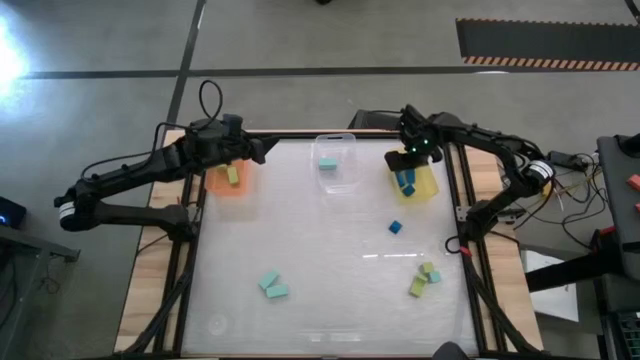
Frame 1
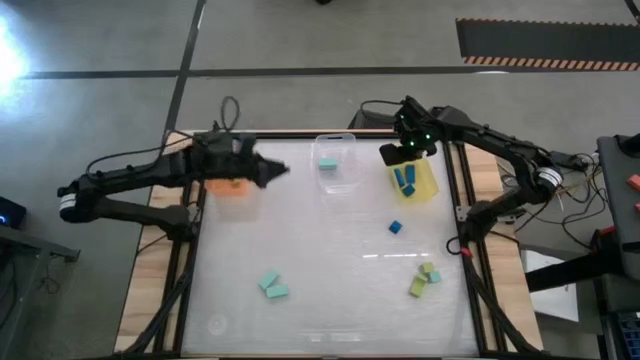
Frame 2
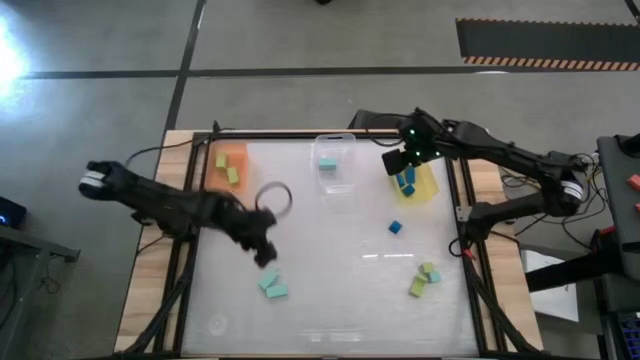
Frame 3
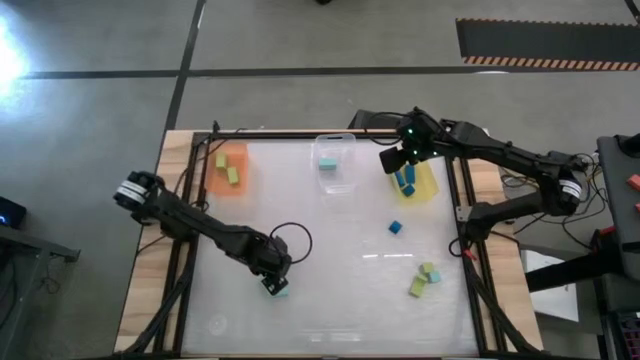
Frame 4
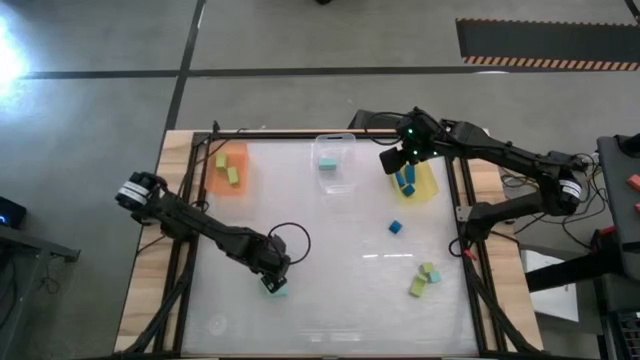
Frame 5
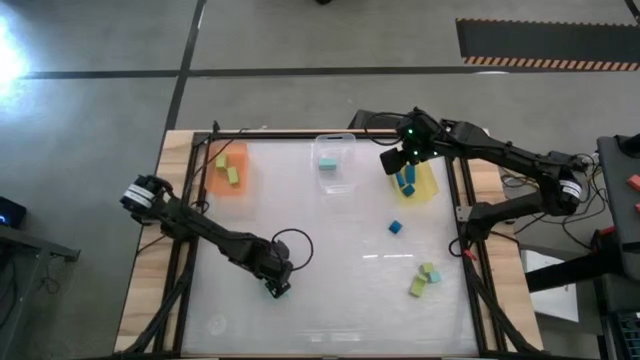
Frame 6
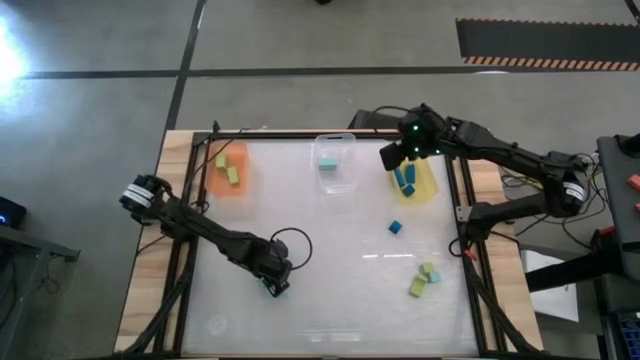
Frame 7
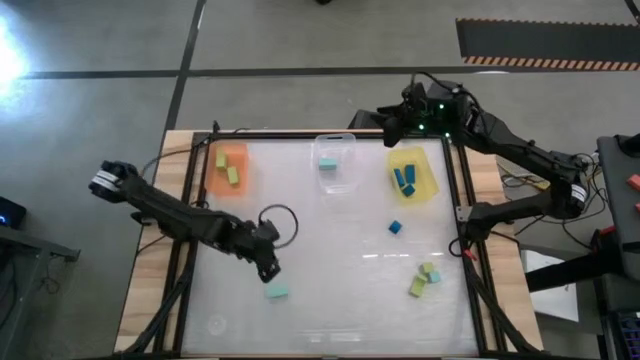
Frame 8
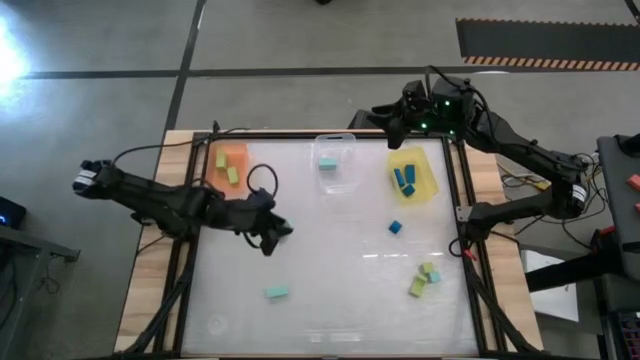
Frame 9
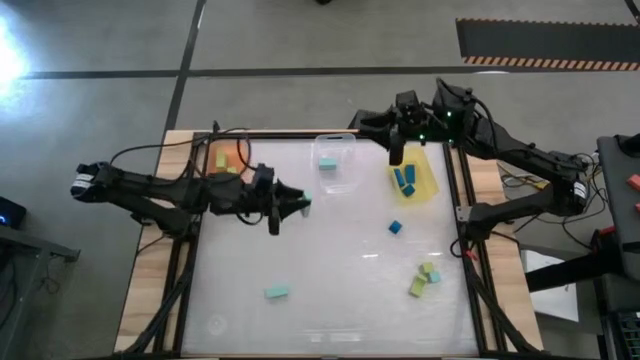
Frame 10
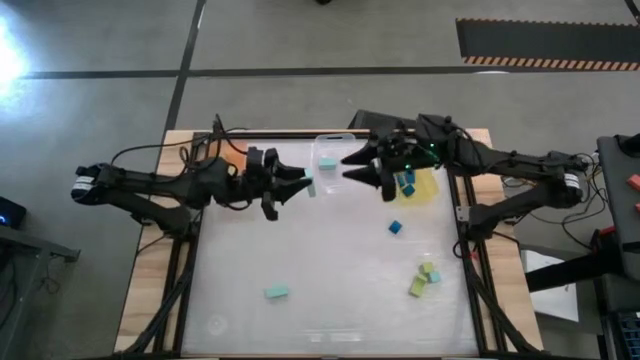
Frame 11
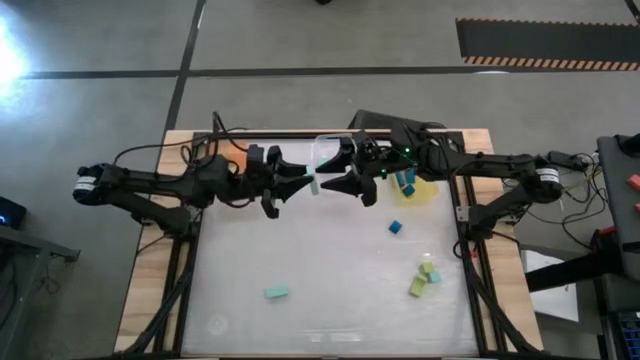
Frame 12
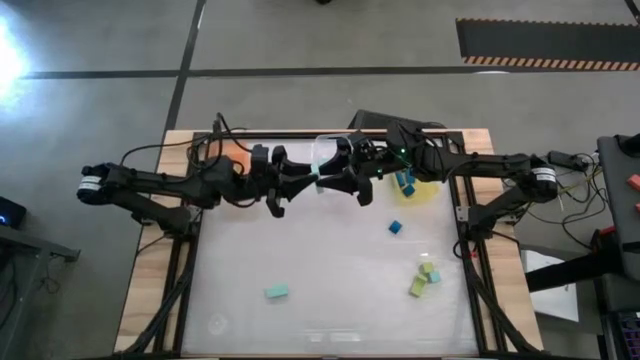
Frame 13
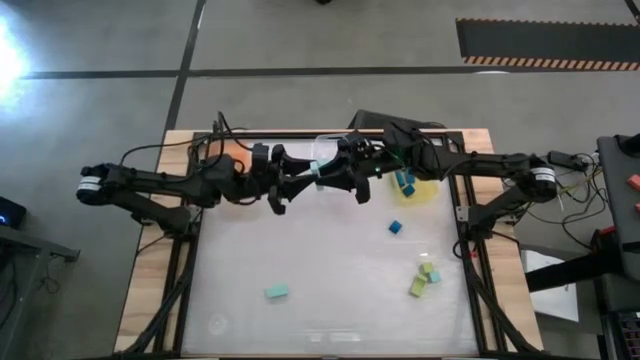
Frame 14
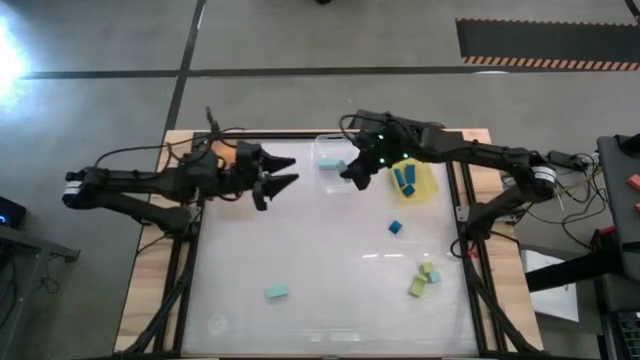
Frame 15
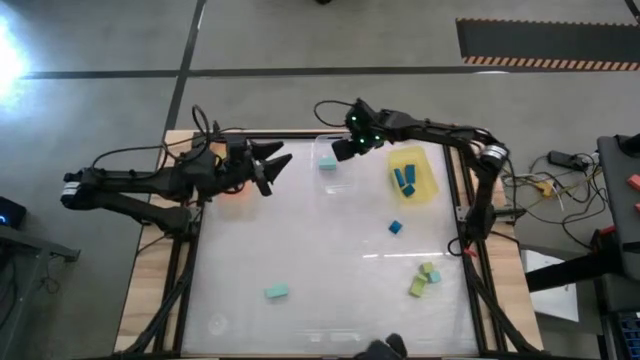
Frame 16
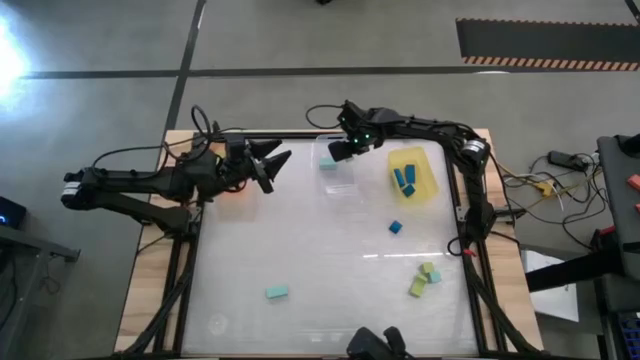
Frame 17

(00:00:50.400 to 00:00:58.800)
Task: Sort & place blocks by color
Put the light blue block into the transparent bin

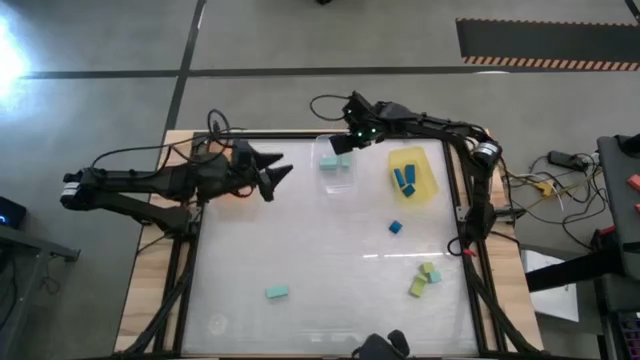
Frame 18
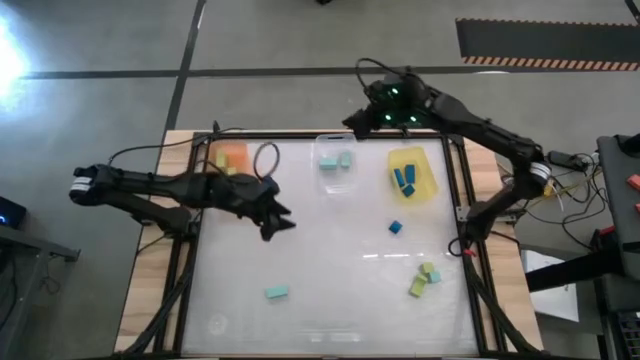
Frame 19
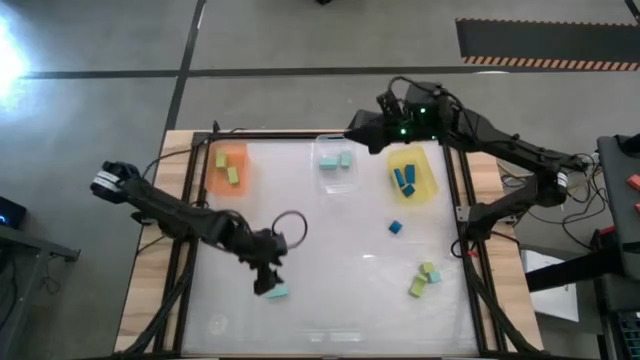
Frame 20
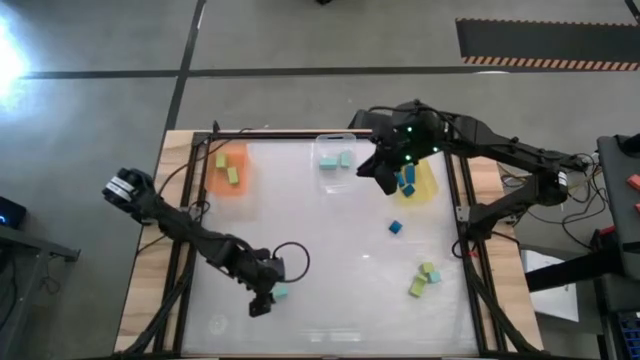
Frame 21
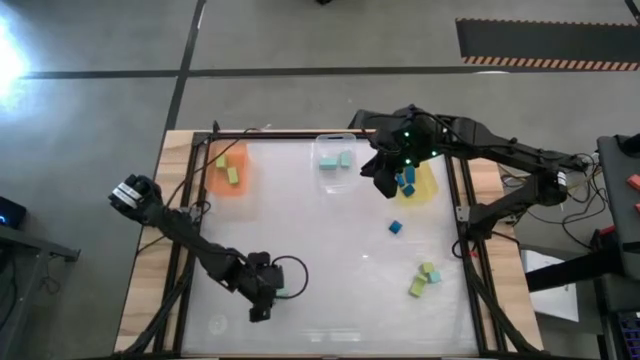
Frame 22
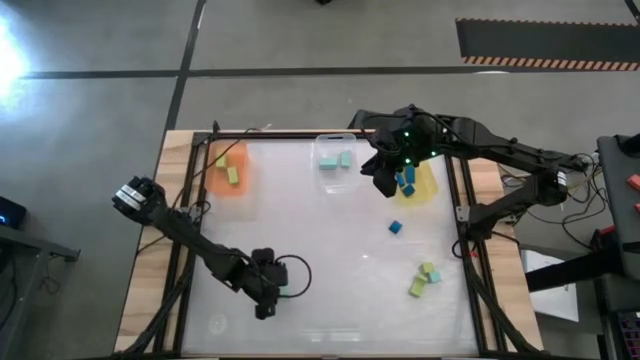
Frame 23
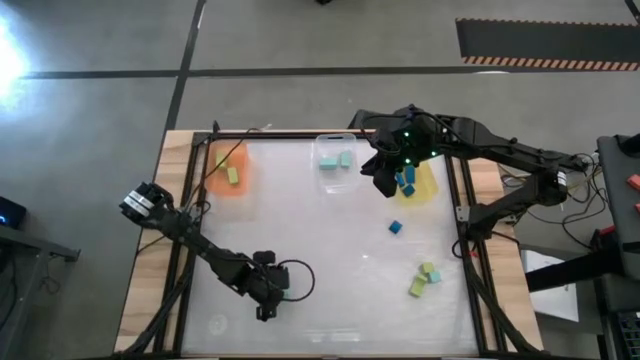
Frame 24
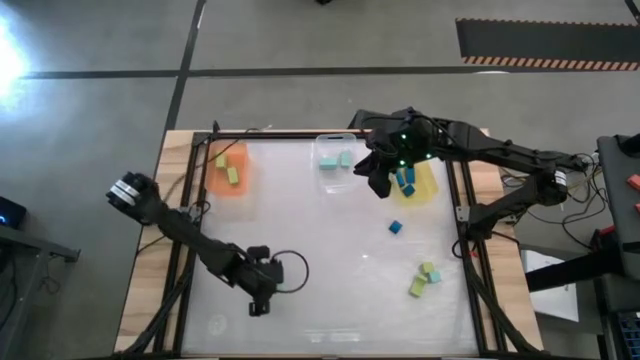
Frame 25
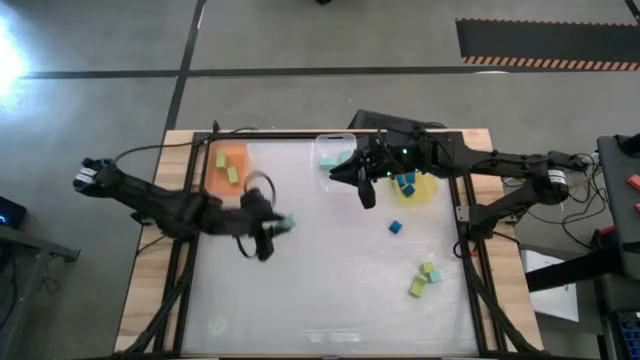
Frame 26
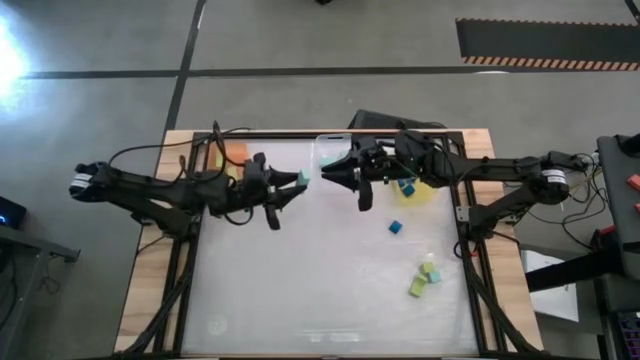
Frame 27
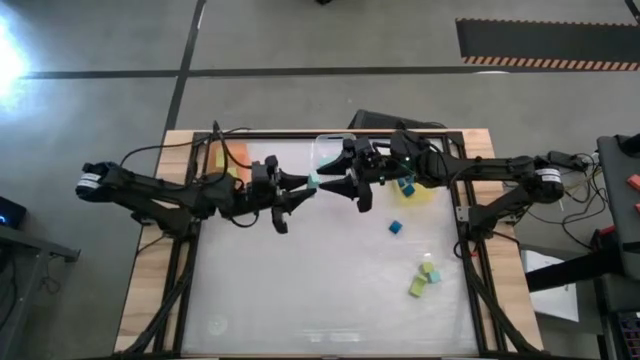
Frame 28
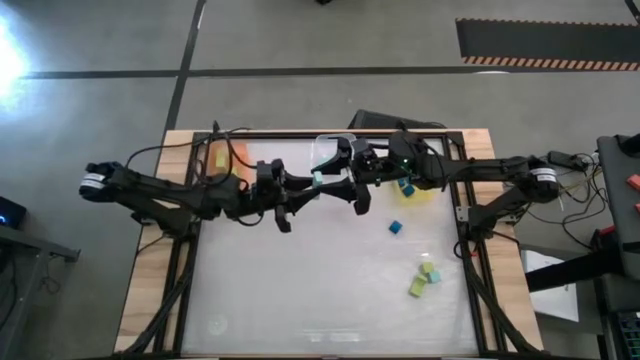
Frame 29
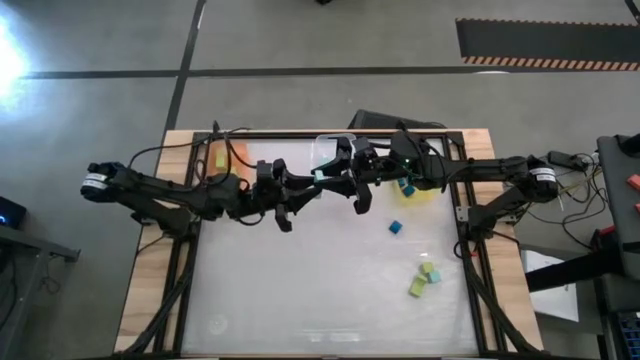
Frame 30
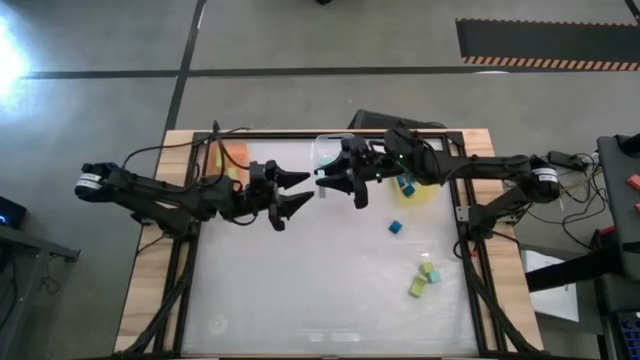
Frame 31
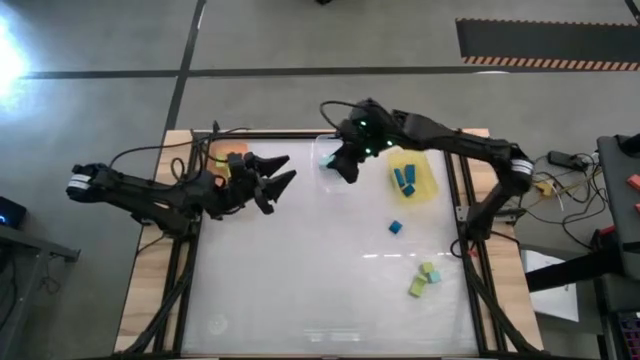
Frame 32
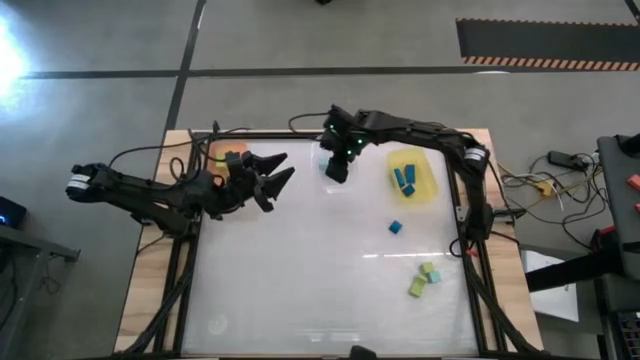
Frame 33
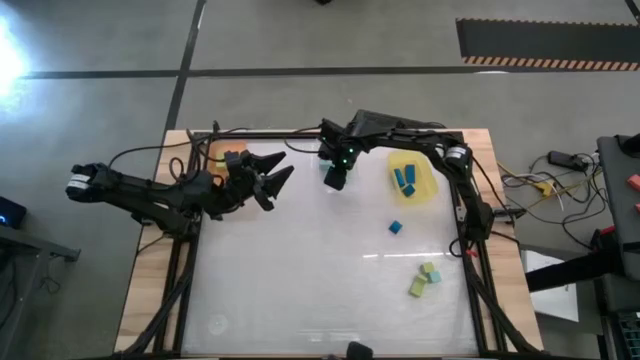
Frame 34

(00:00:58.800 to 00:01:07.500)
Put the light blue block into the transparent bin

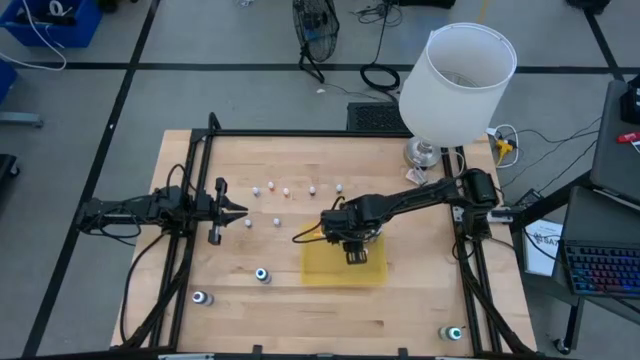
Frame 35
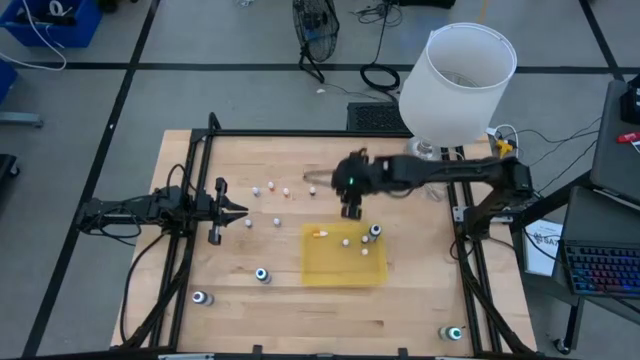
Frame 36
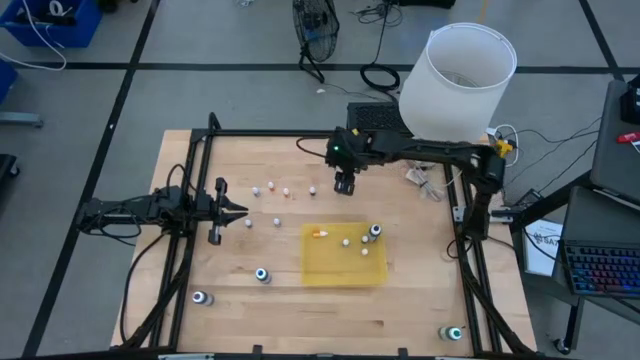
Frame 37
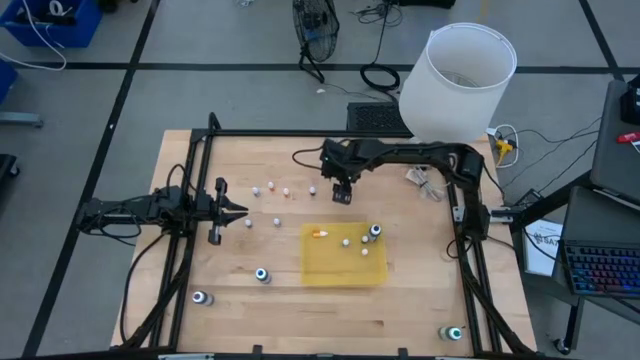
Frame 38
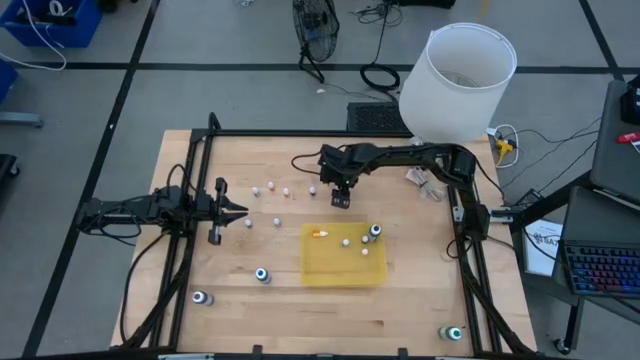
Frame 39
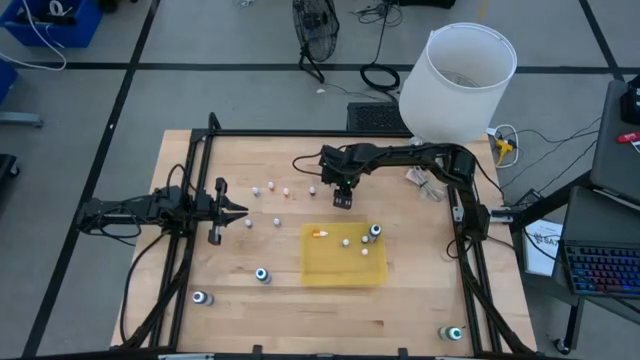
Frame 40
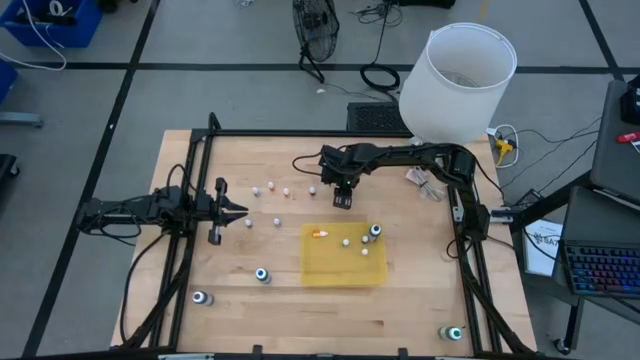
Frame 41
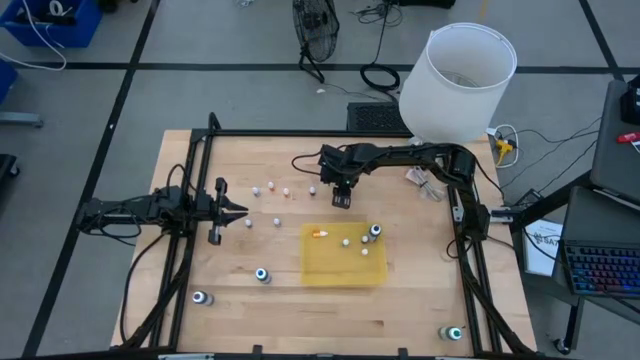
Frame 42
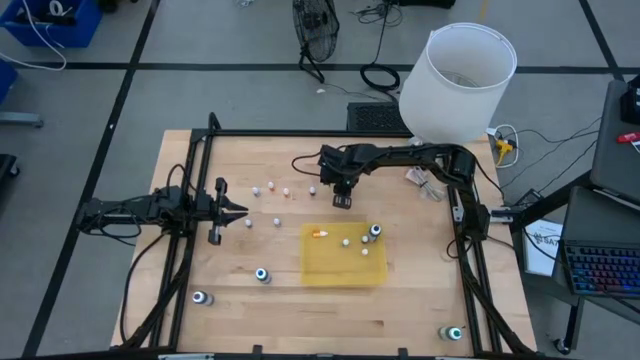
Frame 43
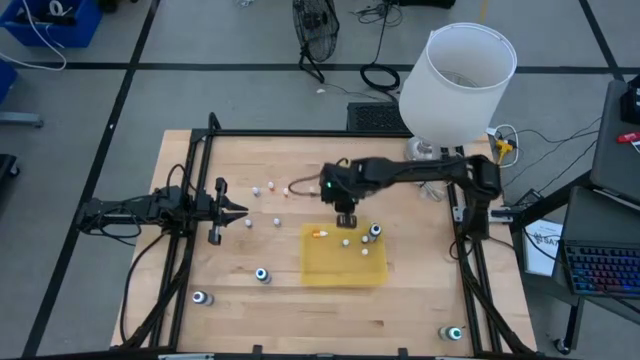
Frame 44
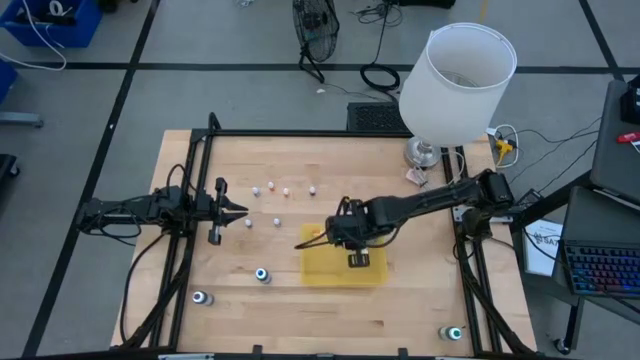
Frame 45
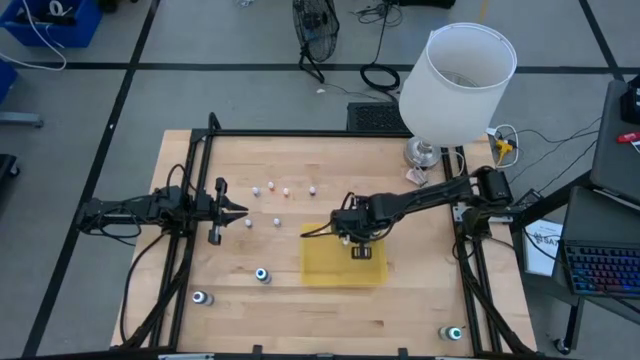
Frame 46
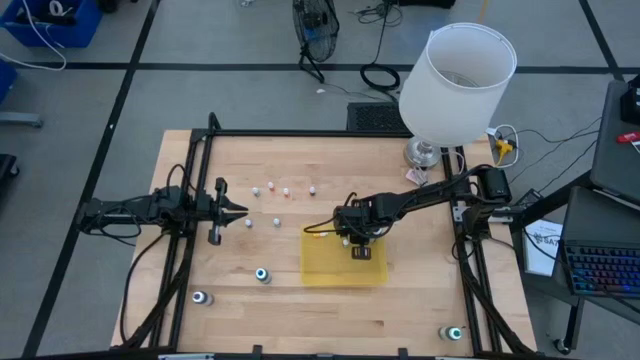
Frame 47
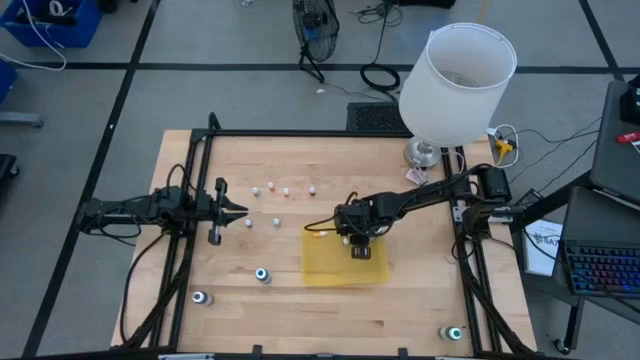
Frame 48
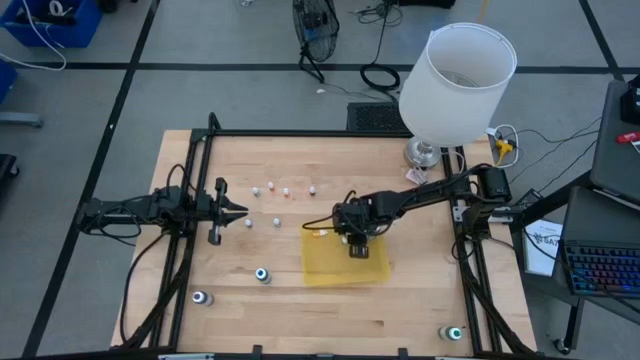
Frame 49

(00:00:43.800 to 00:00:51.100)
Task: Pick & Place food coloring
Put the small black food coloring bottle into the yellow bin
